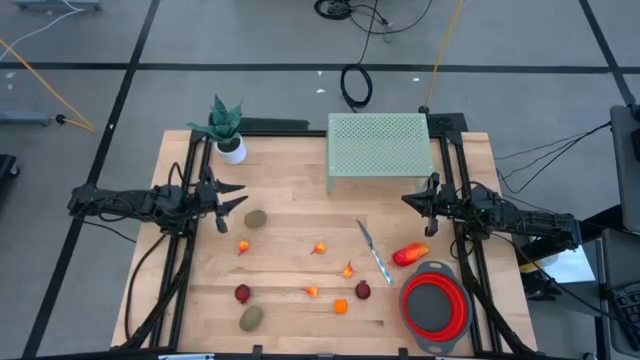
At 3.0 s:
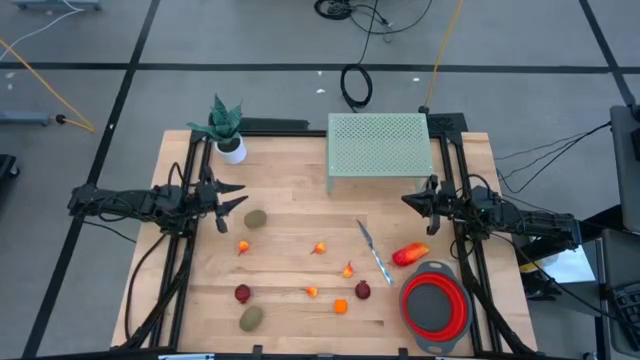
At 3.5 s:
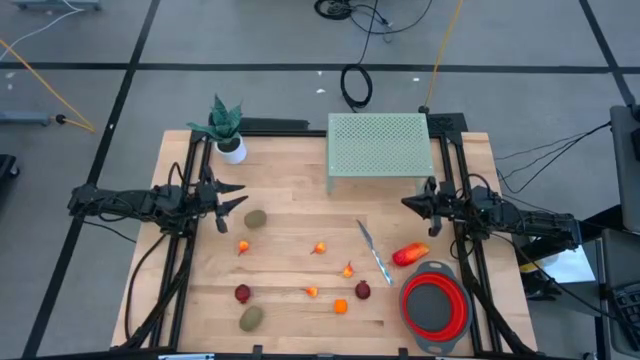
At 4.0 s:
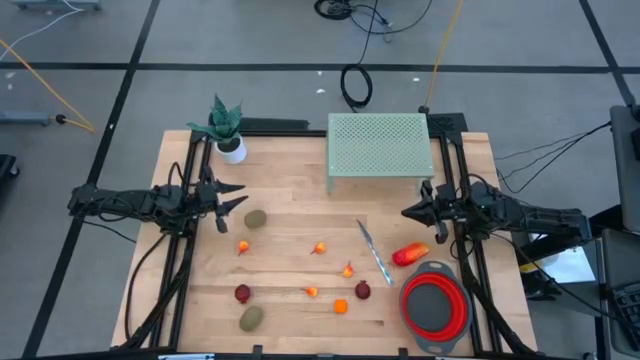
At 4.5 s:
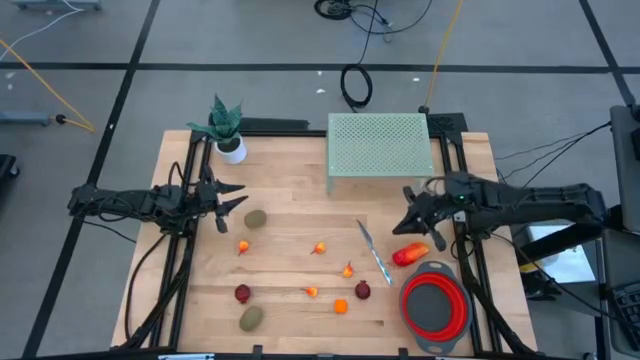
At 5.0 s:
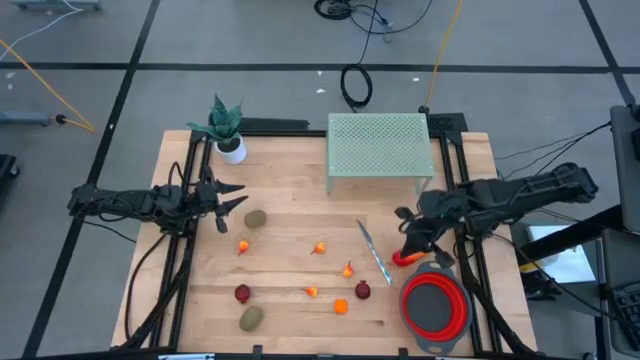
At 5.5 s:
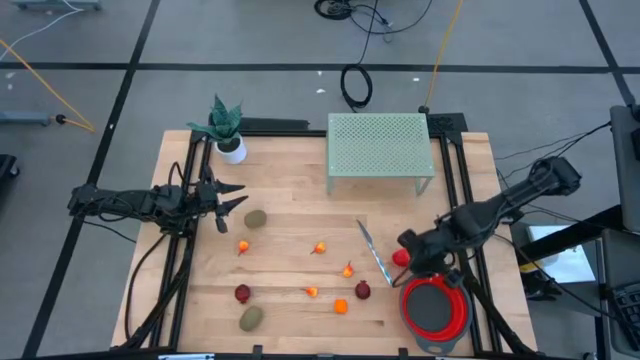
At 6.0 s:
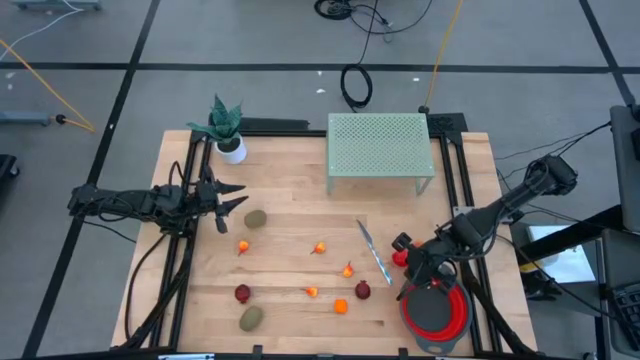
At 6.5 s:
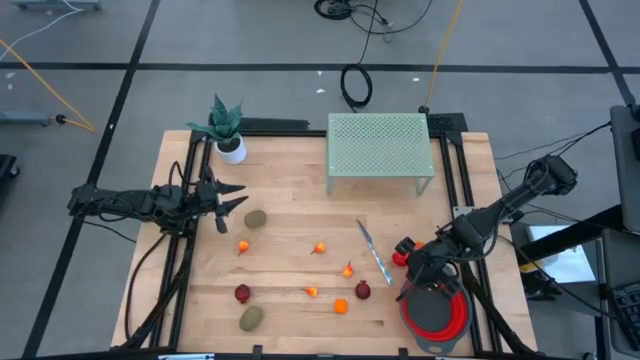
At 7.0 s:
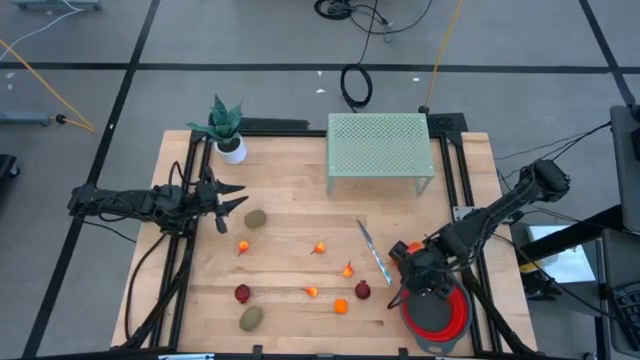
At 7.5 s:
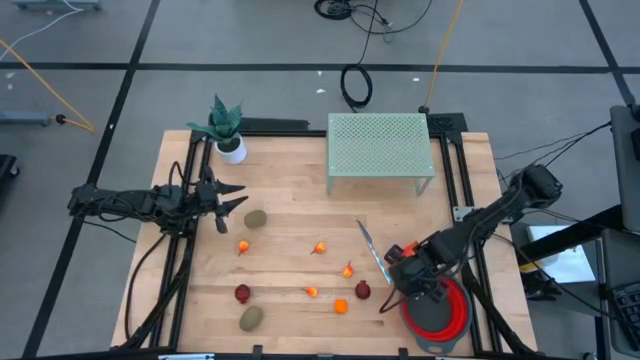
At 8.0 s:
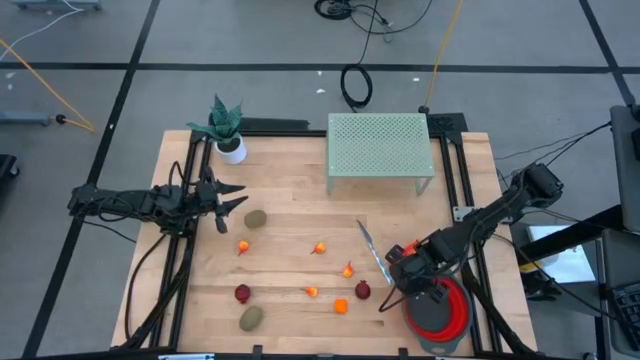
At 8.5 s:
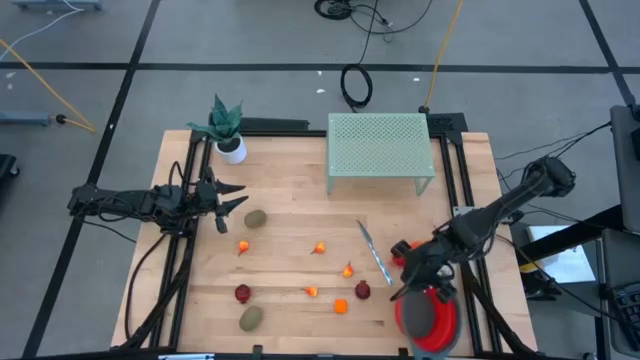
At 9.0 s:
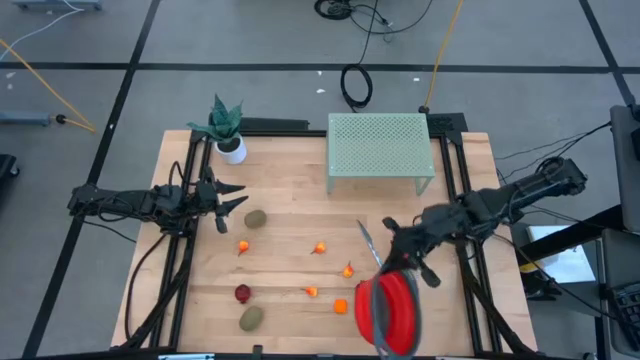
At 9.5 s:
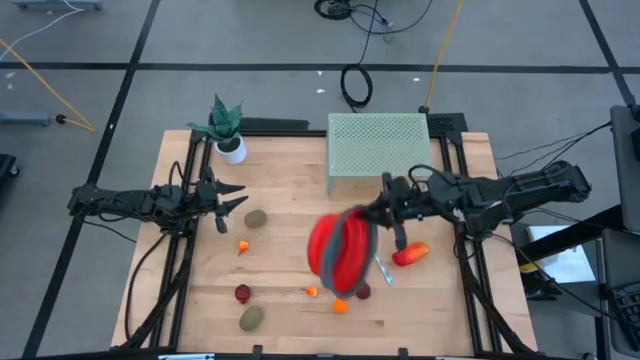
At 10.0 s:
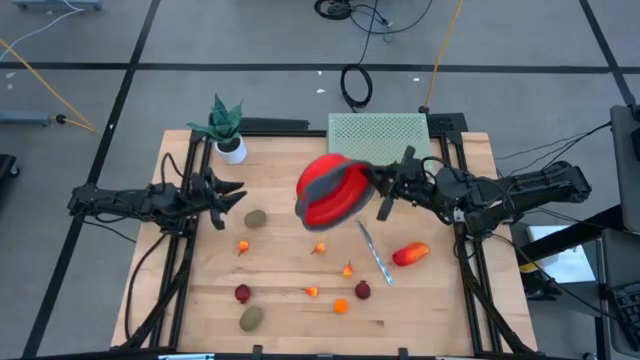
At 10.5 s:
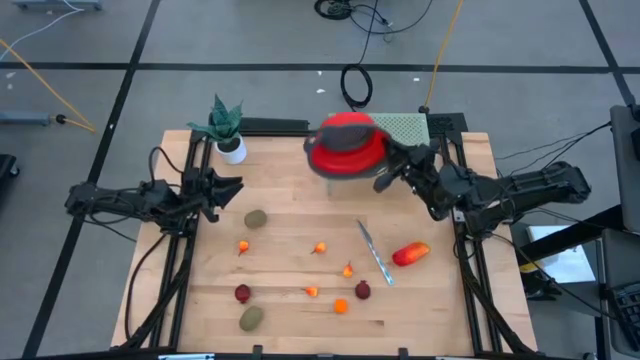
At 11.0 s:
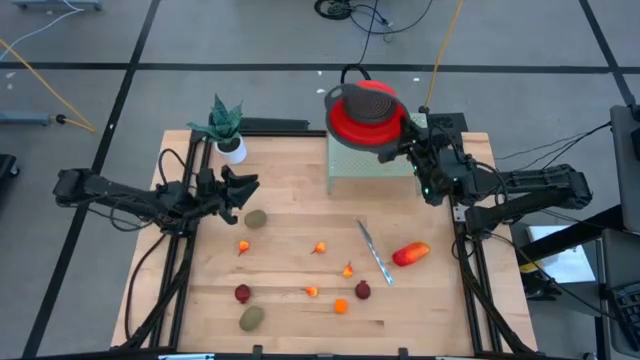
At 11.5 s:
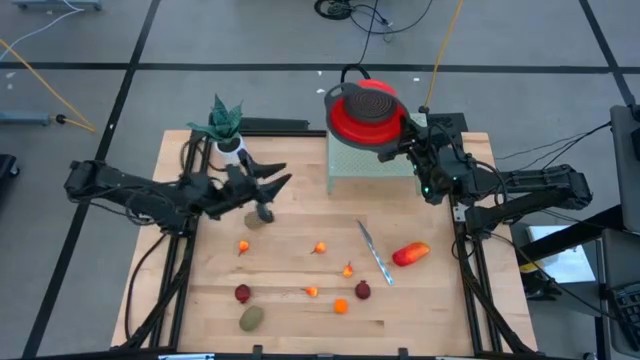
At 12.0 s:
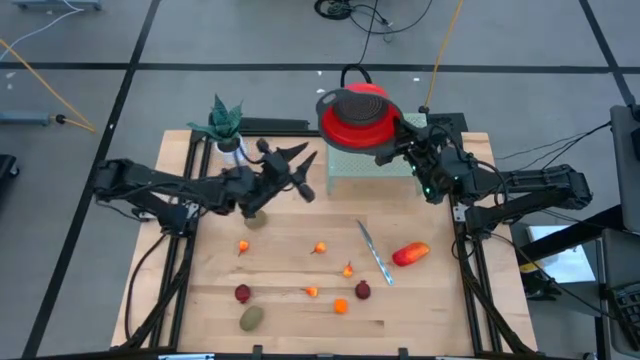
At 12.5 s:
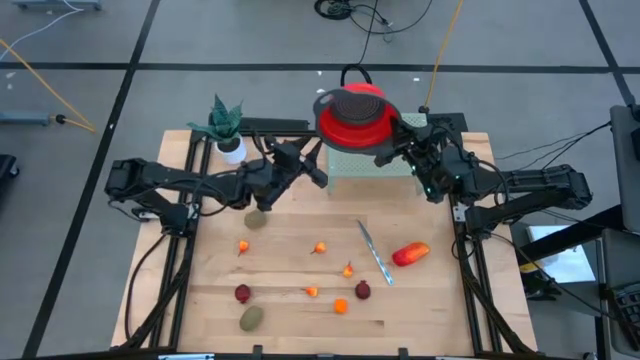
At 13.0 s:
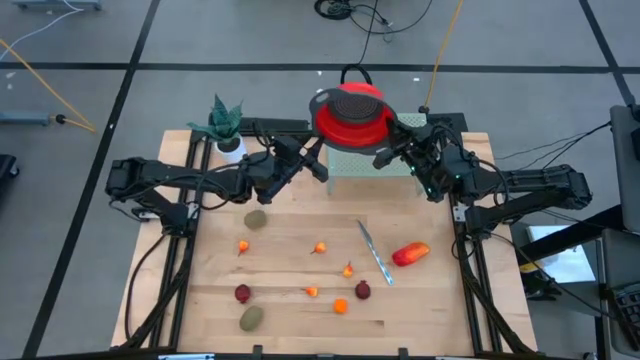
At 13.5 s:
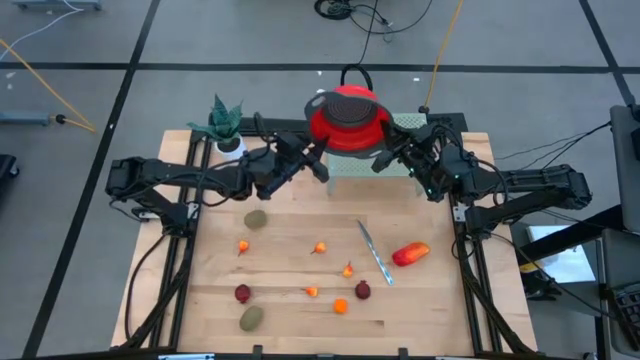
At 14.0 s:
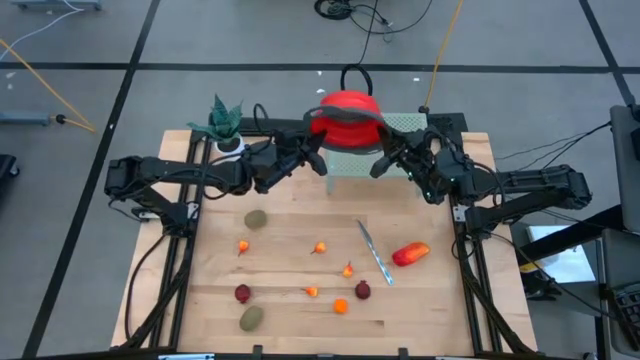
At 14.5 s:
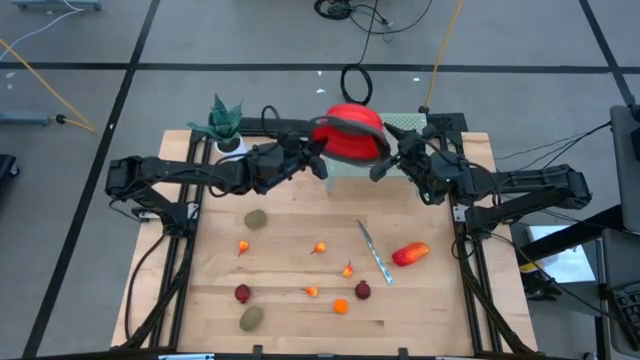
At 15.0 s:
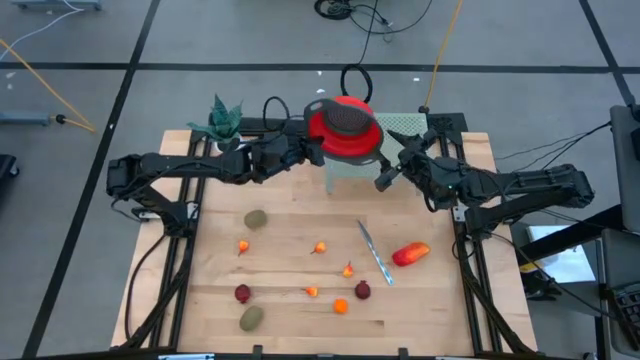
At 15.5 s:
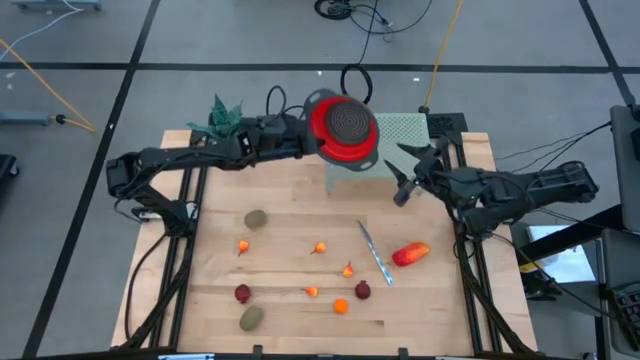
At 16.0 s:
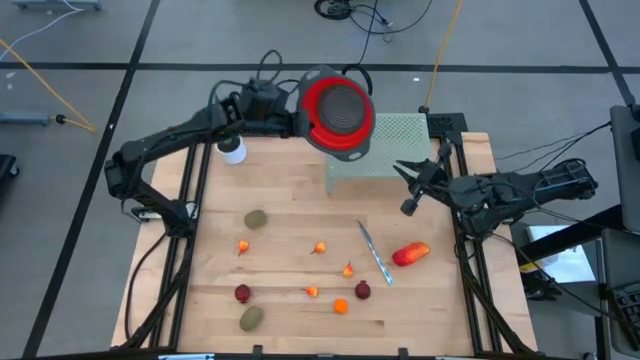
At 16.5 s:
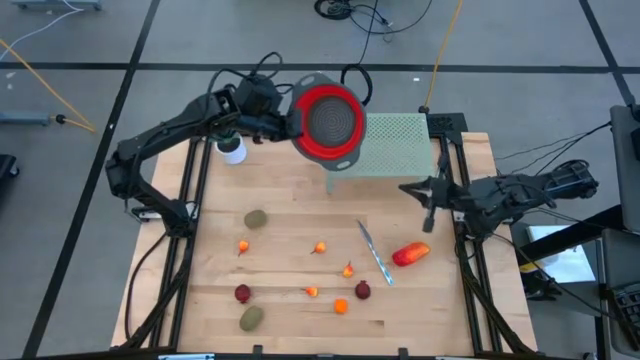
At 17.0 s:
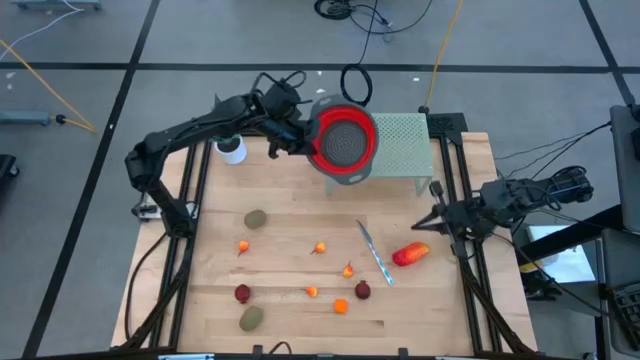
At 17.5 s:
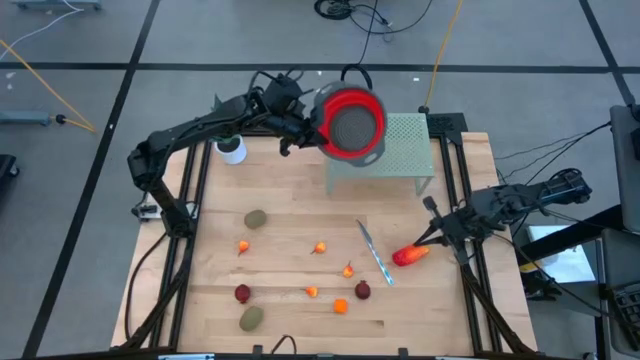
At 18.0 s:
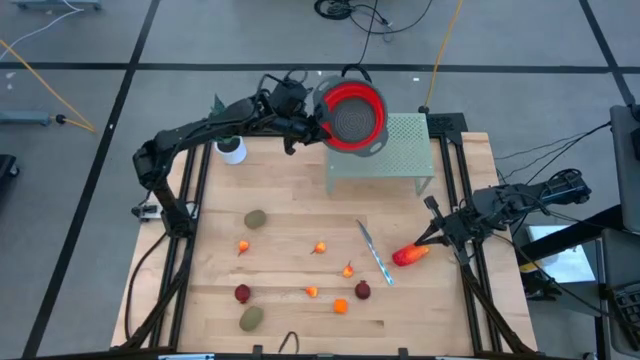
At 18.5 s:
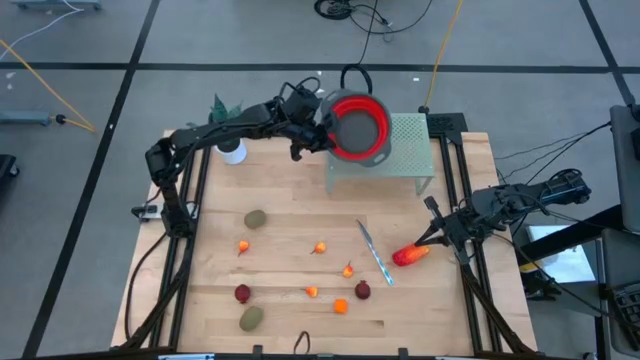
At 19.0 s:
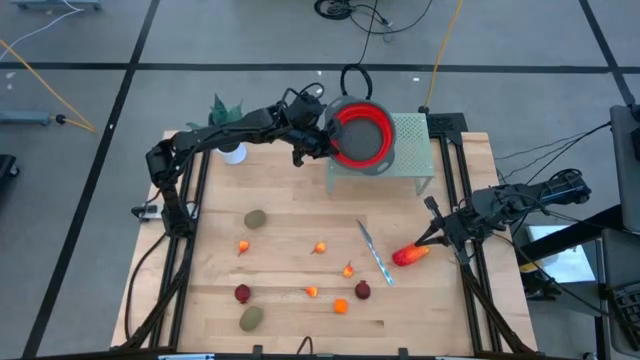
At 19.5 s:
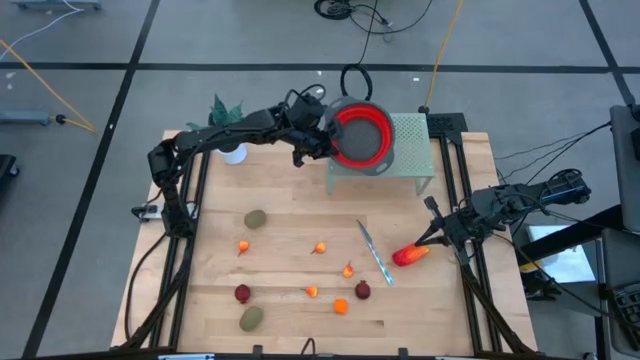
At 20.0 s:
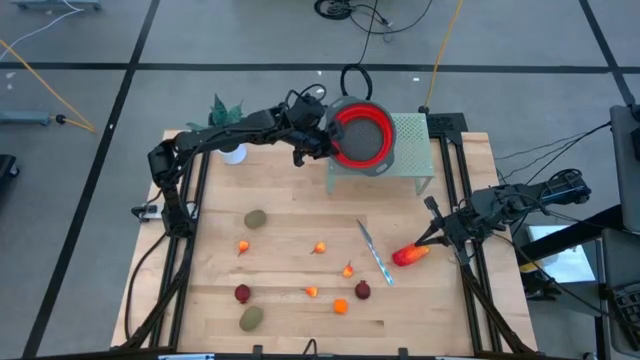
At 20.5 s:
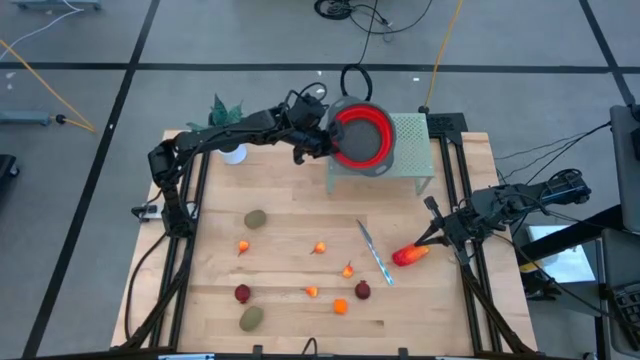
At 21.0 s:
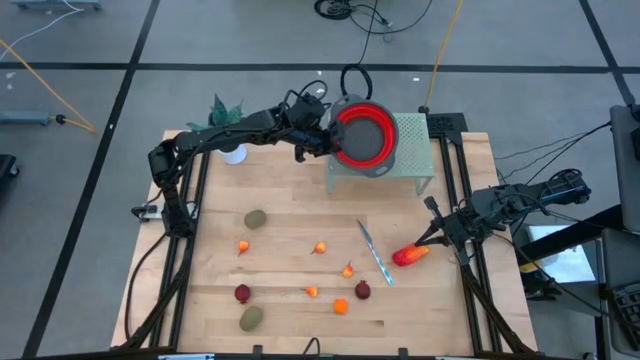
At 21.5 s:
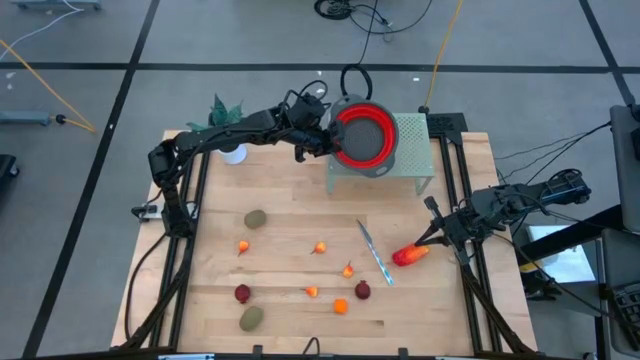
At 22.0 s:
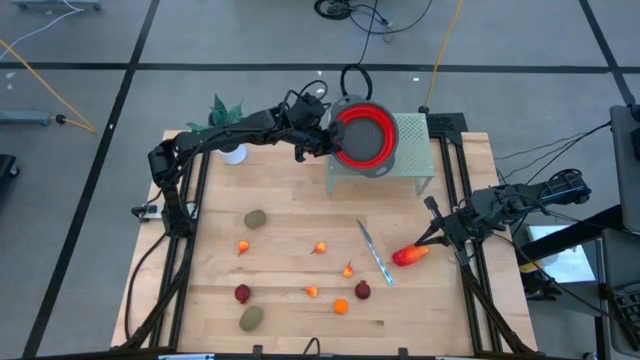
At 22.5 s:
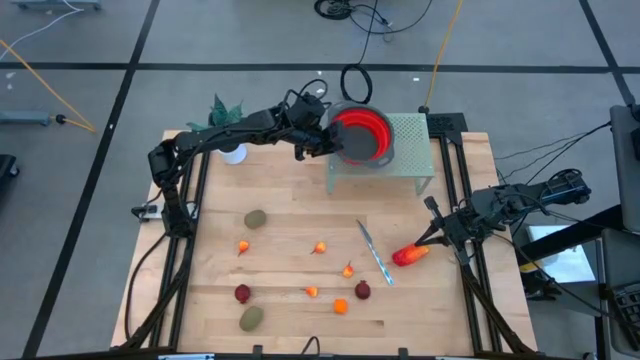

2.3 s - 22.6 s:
Task: Pick & Place Fruit
Put the red basket on the shelf
